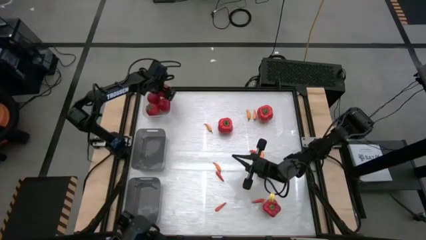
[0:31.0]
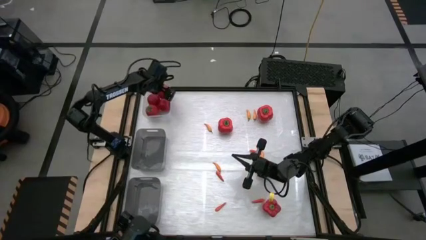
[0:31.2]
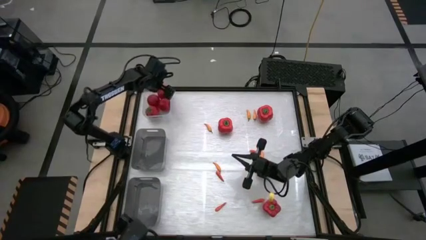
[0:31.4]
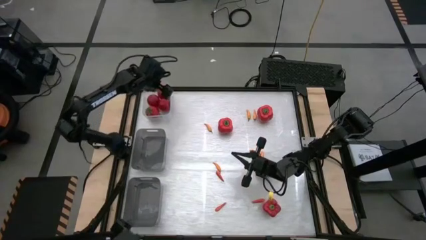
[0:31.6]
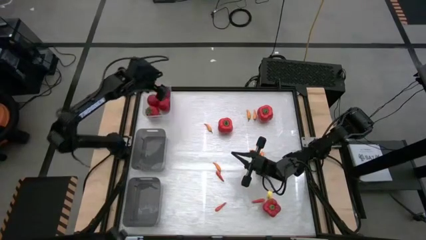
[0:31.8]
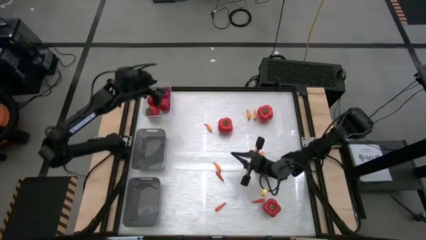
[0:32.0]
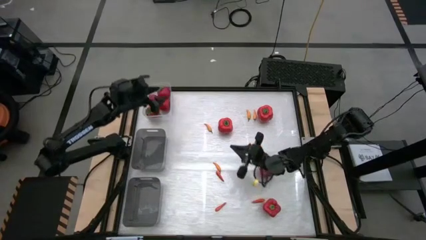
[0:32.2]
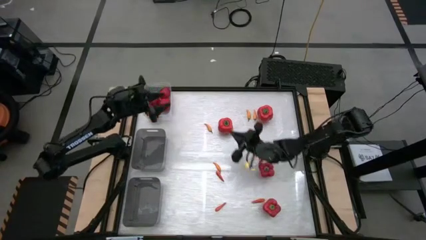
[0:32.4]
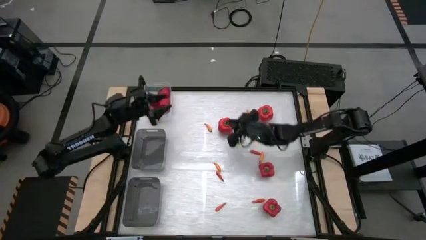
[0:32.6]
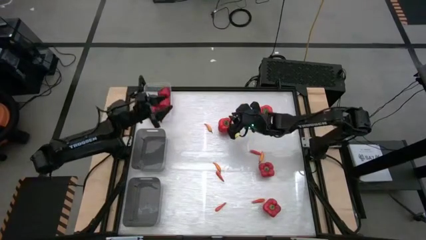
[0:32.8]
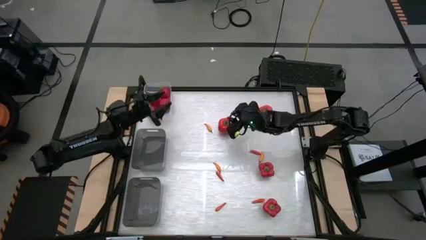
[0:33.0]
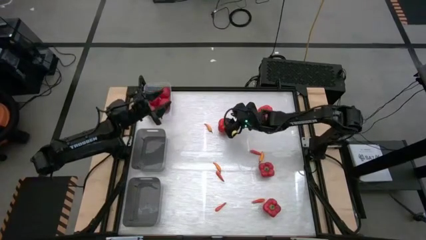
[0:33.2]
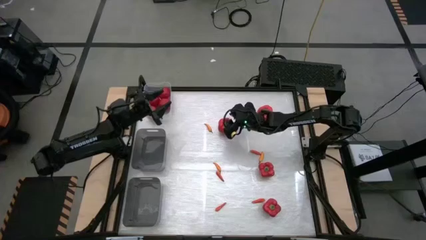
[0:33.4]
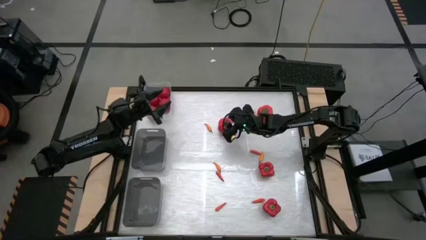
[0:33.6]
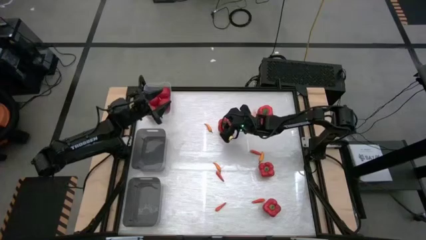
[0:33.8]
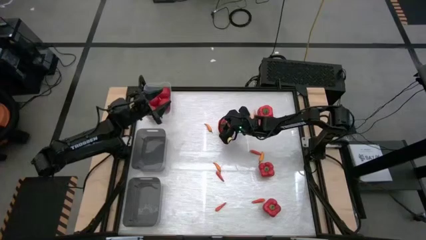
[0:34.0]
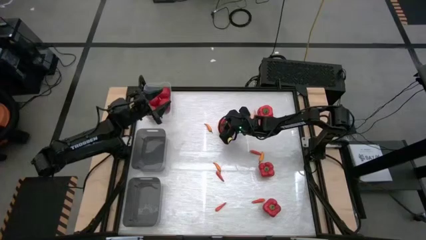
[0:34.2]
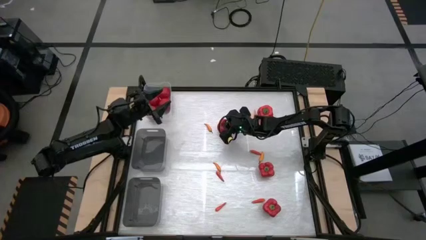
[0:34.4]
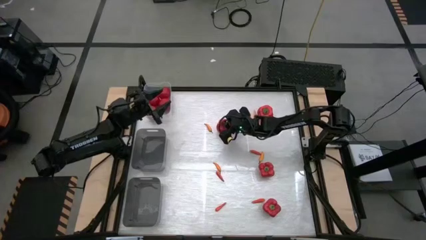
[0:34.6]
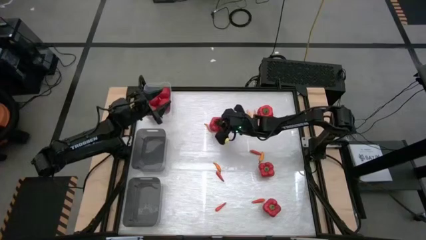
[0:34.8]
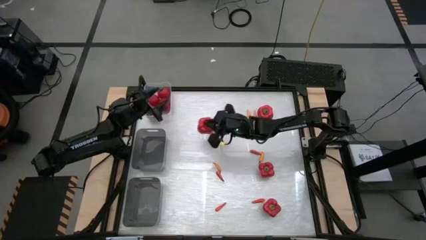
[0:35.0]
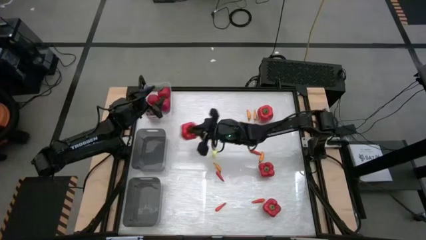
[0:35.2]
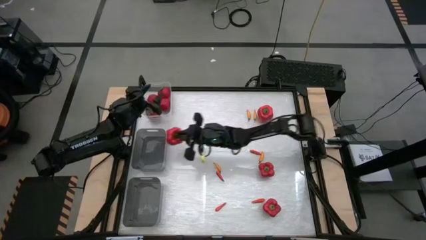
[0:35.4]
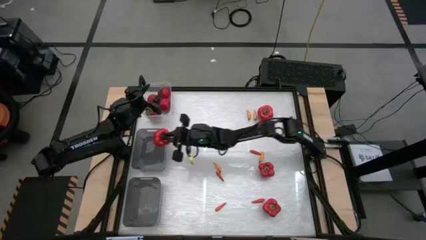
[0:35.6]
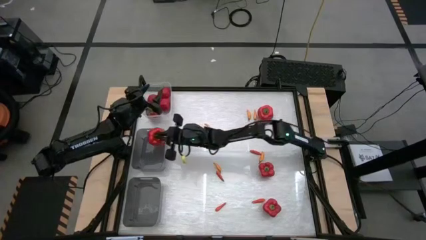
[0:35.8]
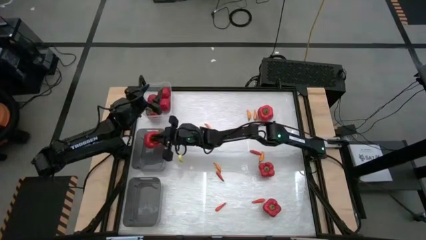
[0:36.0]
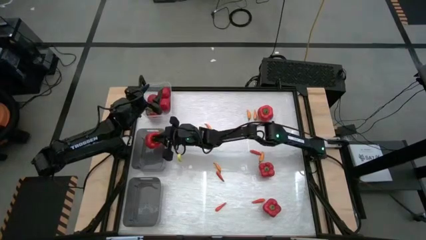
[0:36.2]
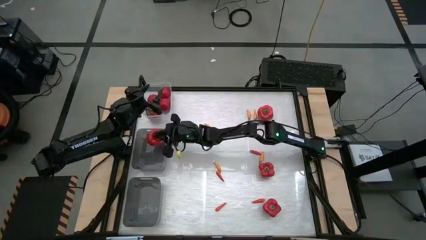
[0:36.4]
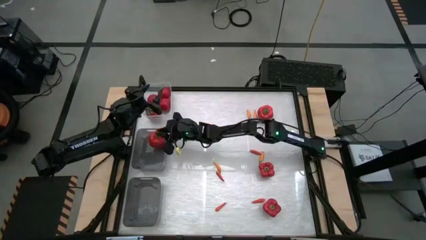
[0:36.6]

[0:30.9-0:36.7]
Task: Sort produce into baskets
Put the bell pepper into the top gray bin

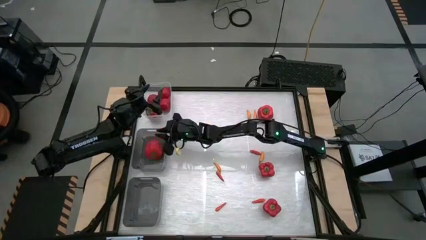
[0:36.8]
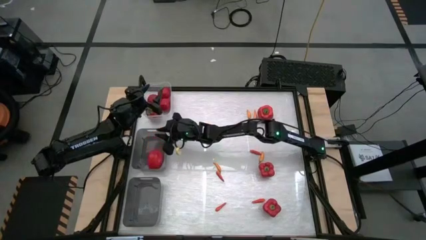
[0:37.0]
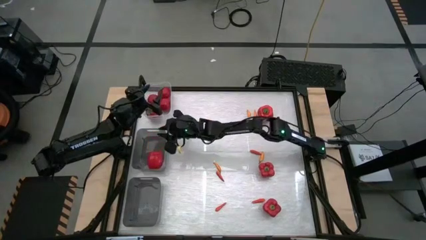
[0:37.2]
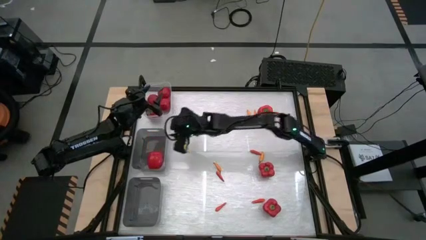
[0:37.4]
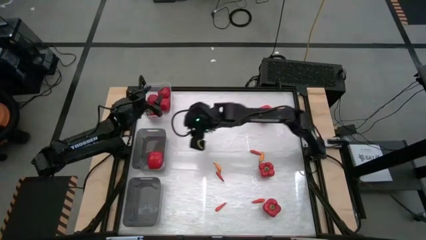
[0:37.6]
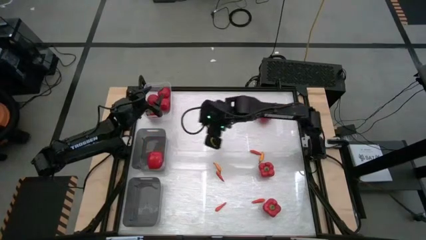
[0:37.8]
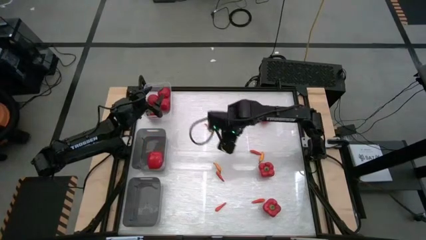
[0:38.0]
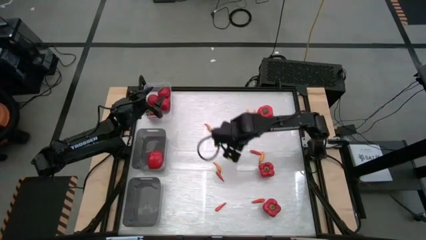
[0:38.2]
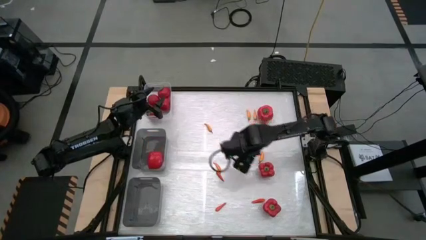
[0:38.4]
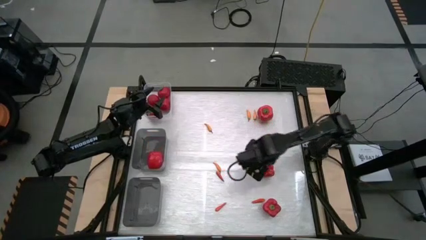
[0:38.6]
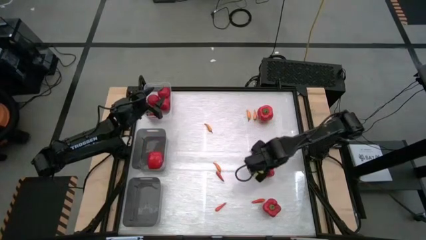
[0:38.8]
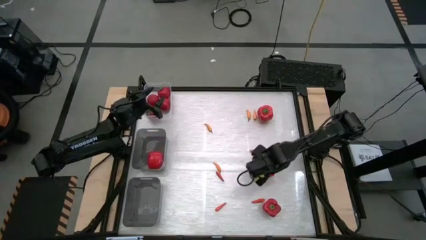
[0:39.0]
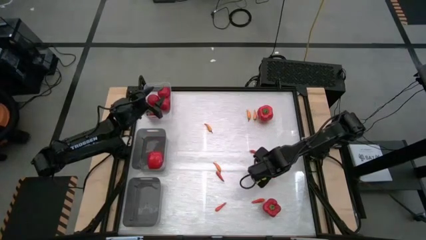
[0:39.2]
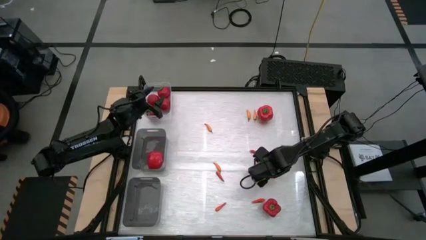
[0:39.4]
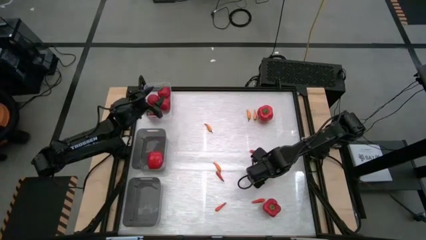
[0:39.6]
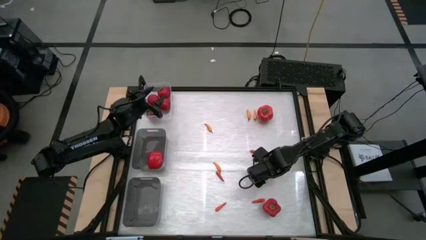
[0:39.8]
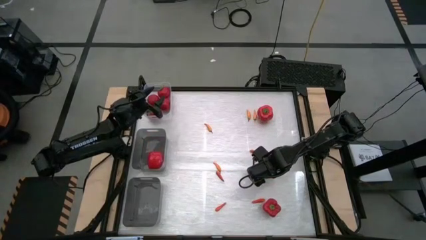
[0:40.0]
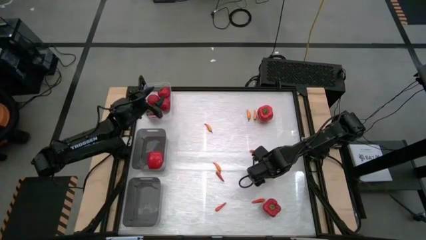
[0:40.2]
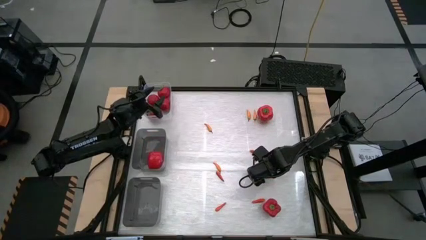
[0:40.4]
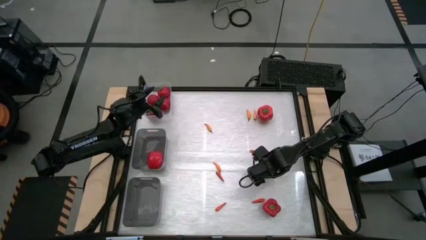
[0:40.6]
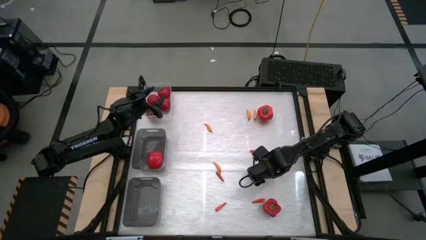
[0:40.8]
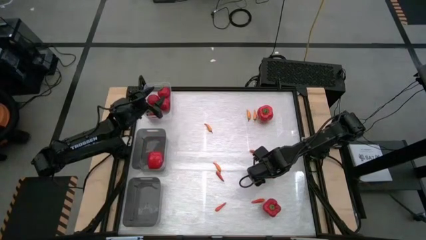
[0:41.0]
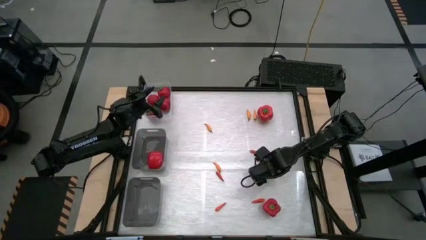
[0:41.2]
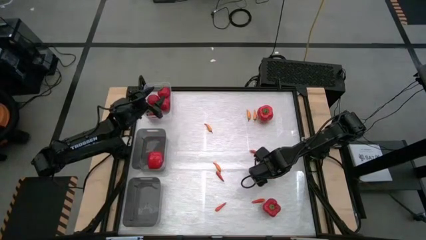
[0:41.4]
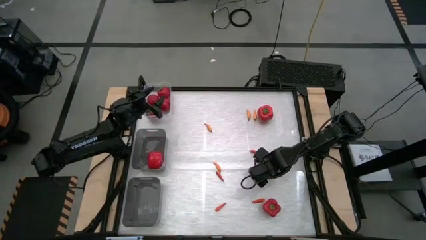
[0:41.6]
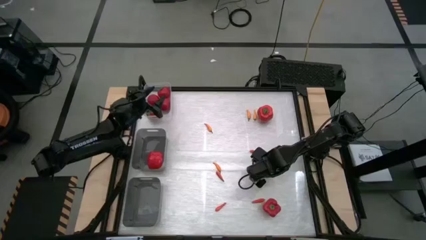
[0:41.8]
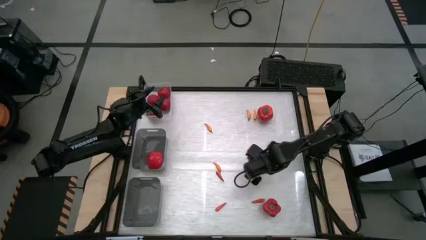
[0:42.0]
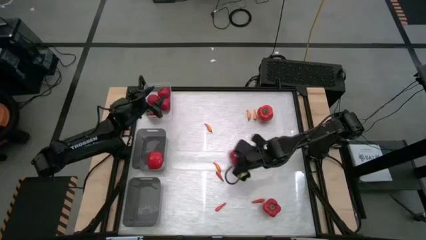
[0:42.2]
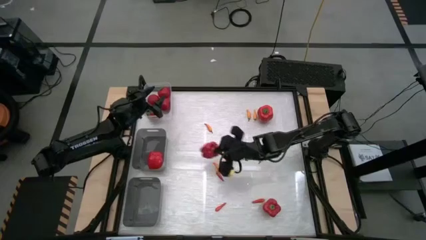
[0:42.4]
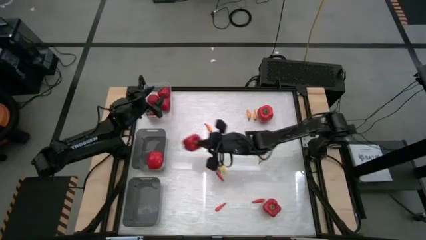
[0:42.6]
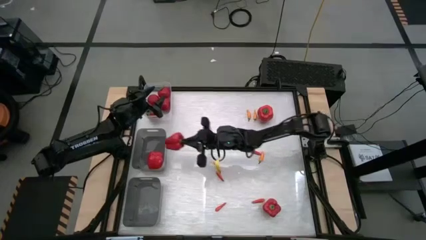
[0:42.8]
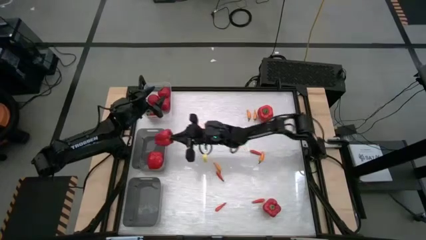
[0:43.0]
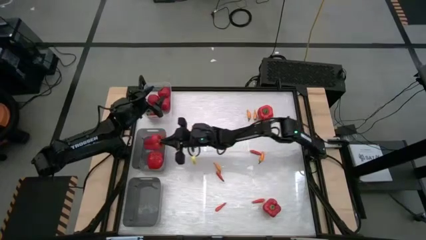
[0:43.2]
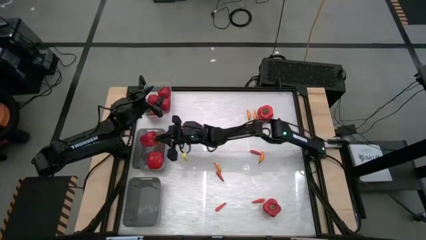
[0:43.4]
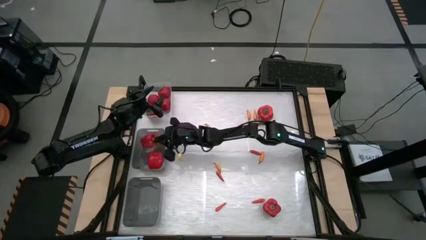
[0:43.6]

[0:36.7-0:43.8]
Put the bell pepper into the top gray bin

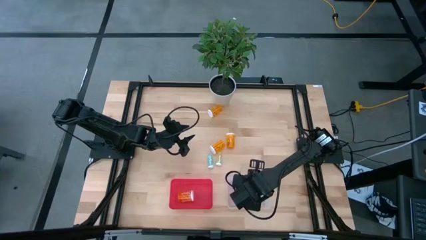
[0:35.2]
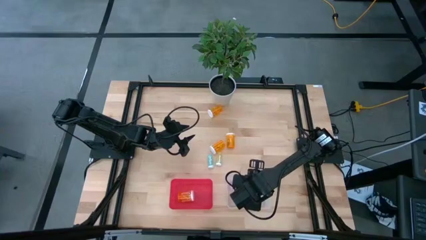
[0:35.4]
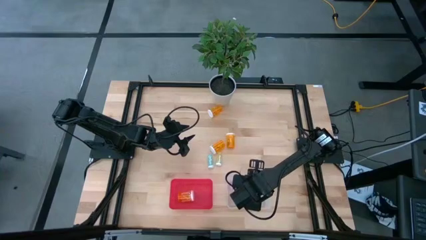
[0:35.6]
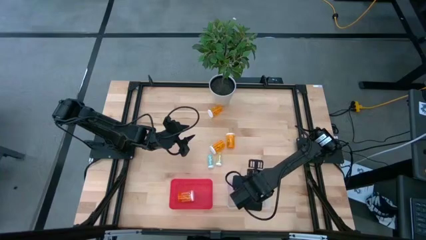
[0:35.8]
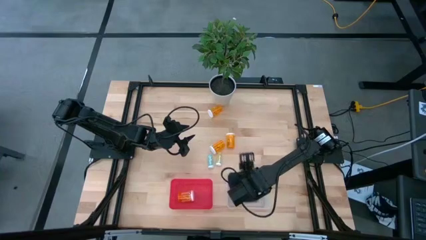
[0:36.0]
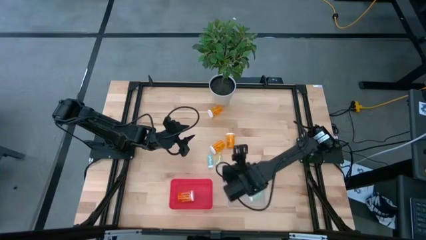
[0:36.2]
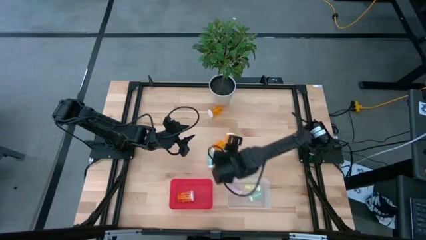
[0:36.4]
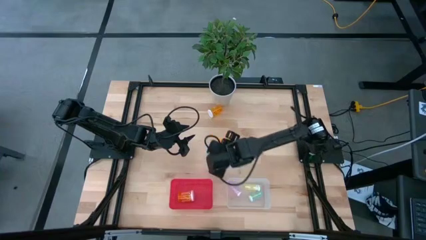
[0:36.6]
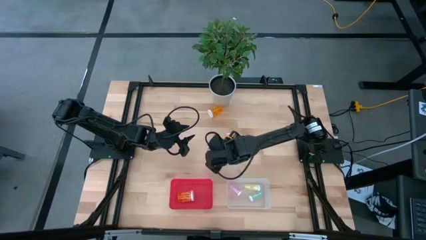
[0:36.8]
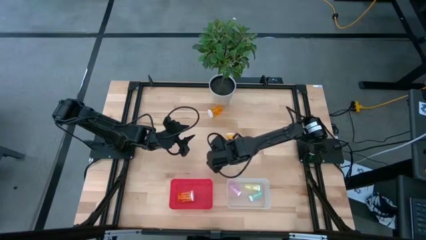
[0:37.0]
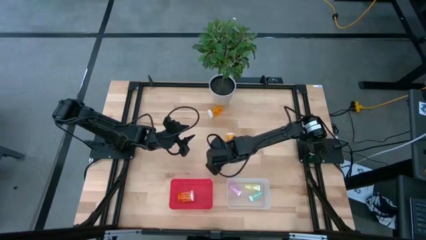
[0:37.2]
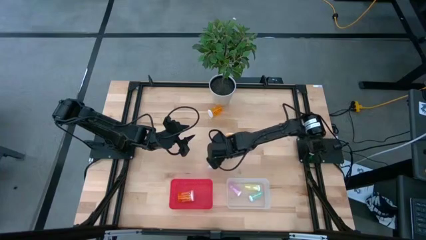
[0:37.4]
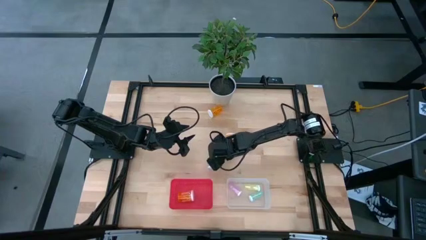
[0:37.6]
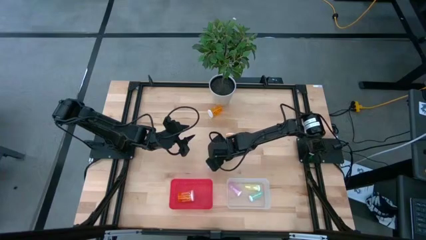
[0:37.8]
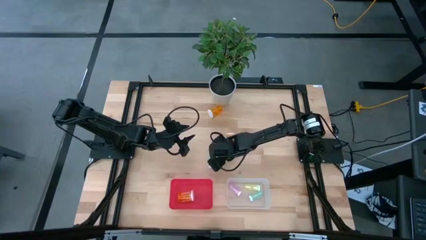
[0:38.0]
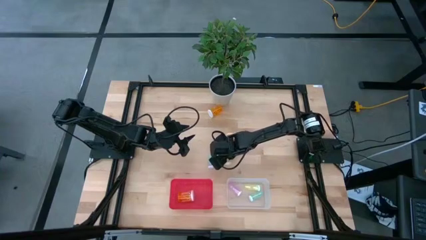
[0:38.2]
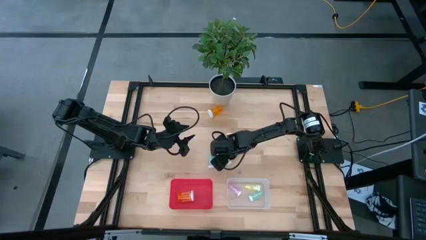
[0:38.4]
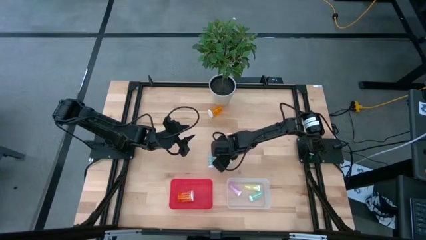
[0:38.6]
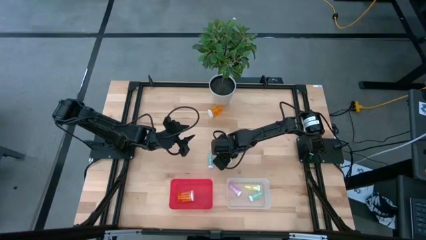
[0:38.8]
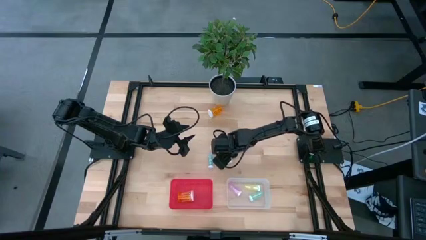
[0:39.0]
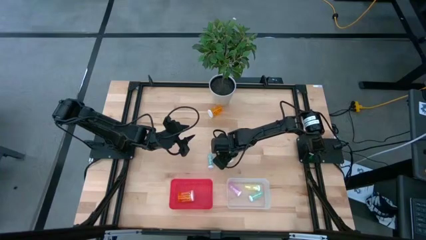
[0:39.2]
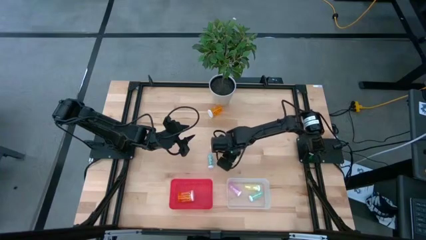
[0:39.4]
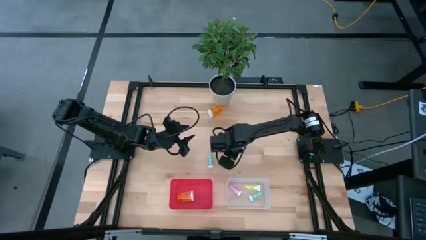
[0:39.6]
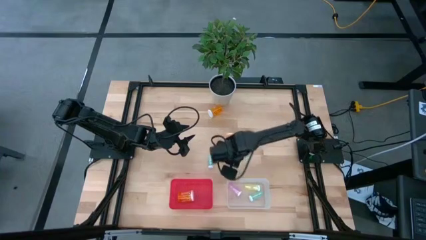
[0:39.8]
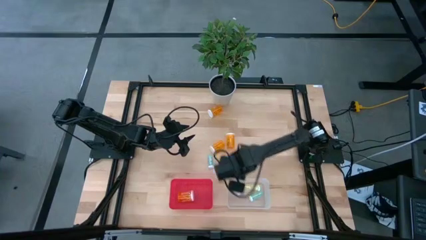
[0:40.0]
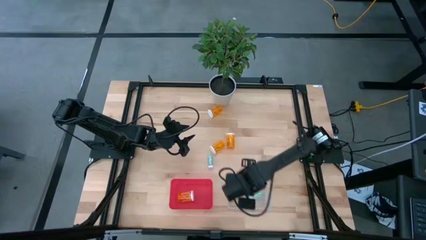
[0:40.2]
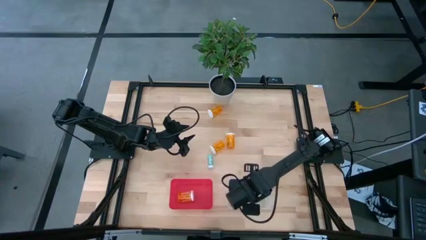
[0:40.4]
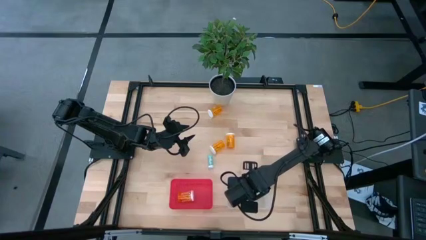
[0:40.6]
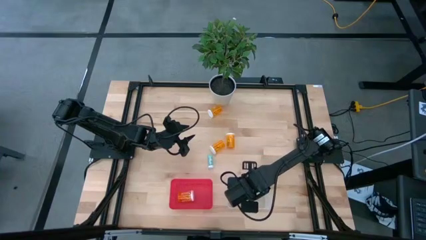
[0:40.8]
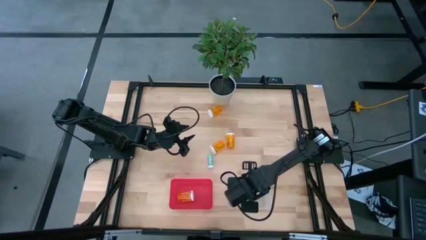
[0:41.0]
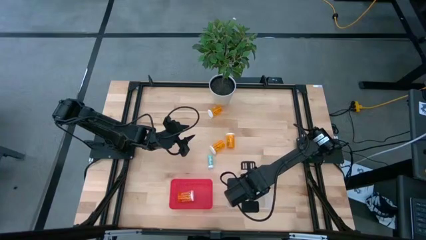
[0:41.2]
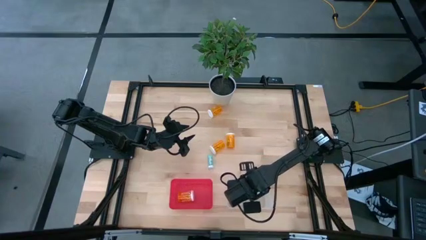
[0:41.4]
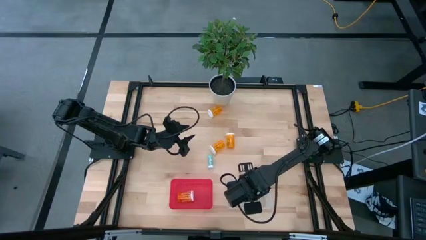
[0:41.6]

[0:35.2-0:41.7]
Task: Pick and place medicine bottles into bin by pill shape (circle, oval)
Put the small yellow pill bottle into the transparent bin
